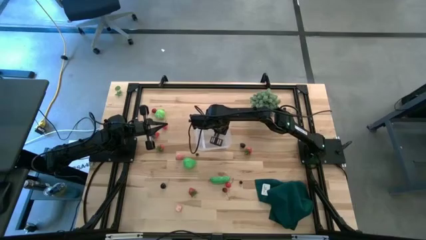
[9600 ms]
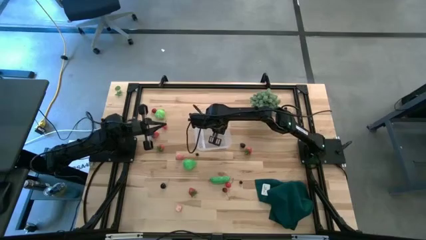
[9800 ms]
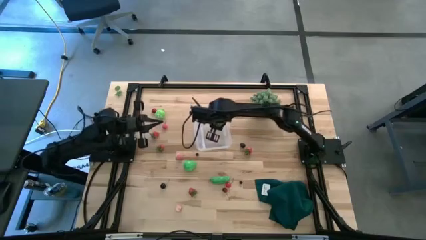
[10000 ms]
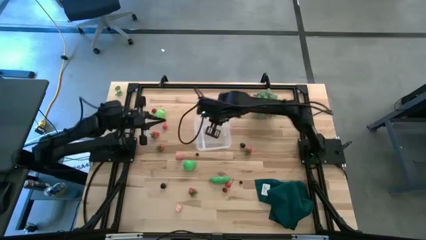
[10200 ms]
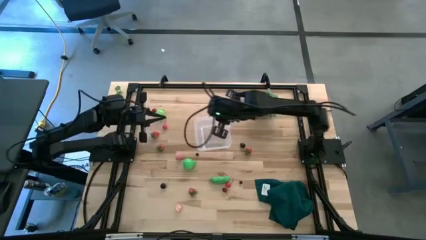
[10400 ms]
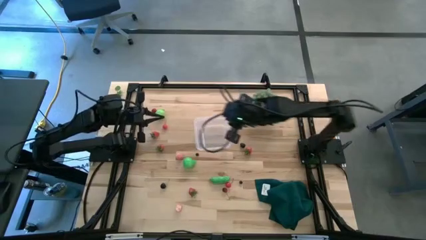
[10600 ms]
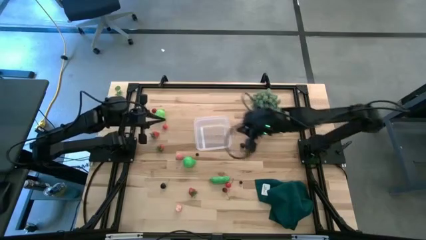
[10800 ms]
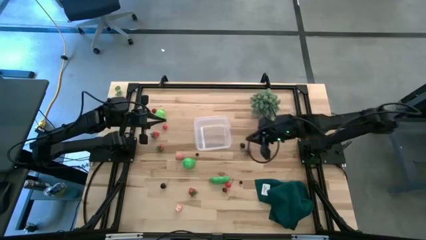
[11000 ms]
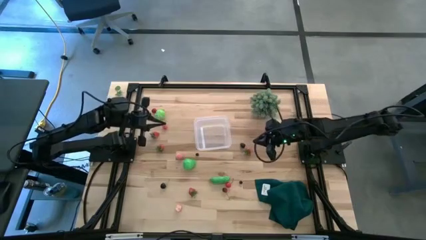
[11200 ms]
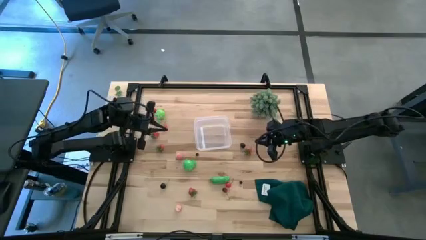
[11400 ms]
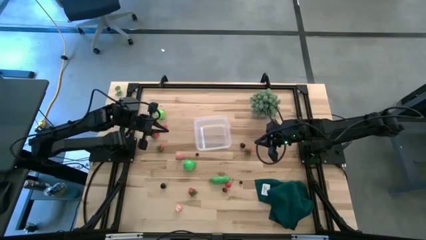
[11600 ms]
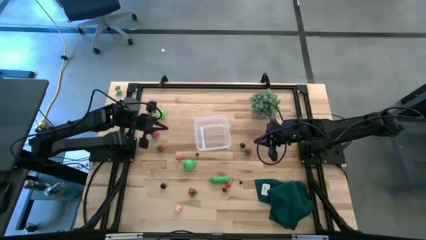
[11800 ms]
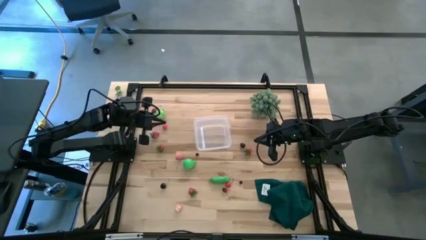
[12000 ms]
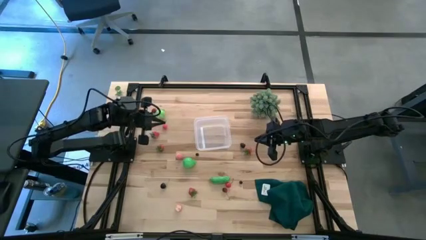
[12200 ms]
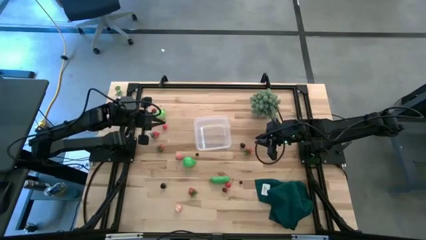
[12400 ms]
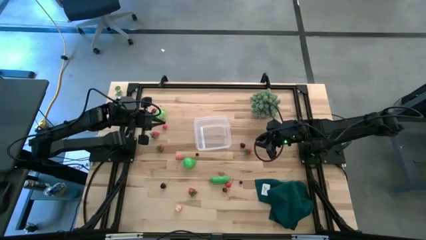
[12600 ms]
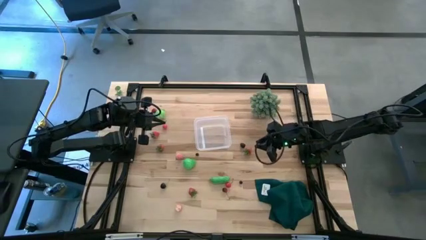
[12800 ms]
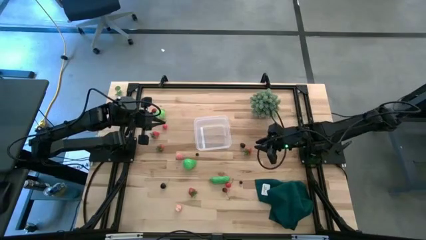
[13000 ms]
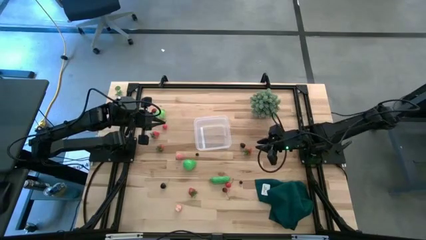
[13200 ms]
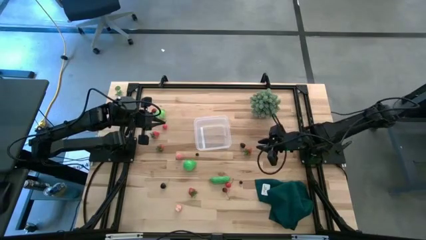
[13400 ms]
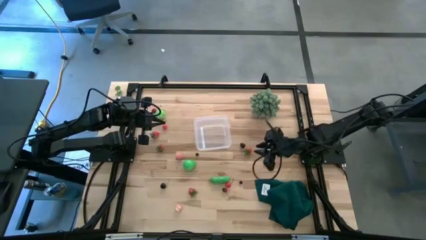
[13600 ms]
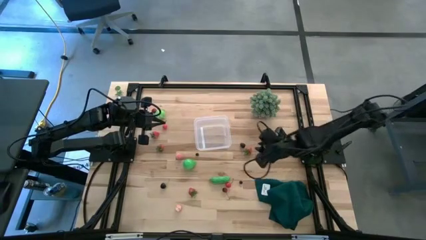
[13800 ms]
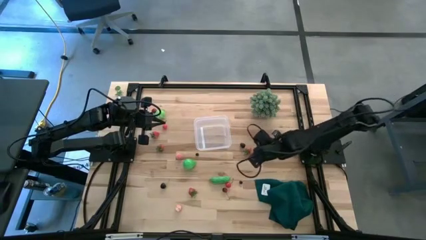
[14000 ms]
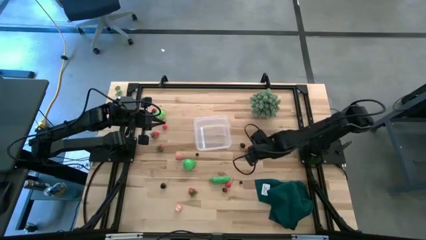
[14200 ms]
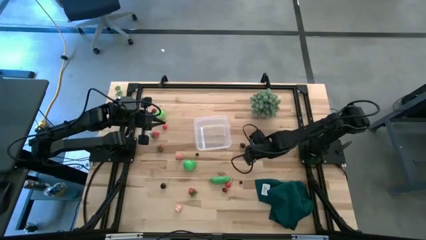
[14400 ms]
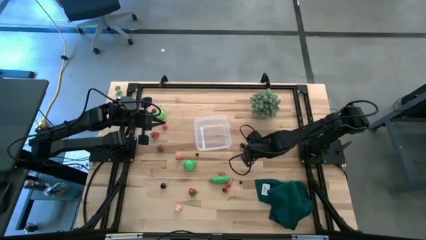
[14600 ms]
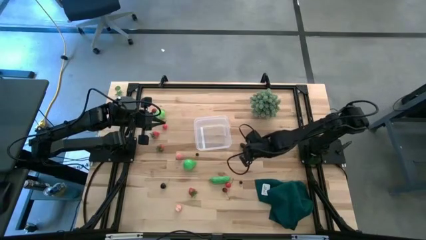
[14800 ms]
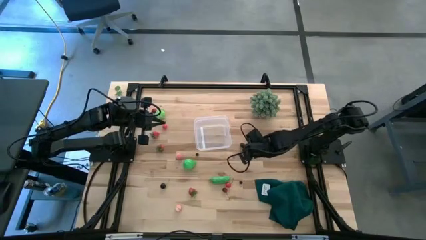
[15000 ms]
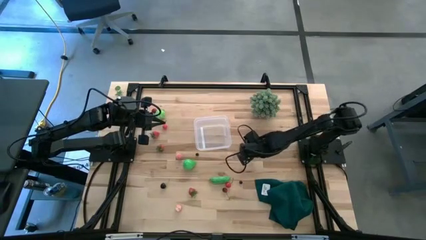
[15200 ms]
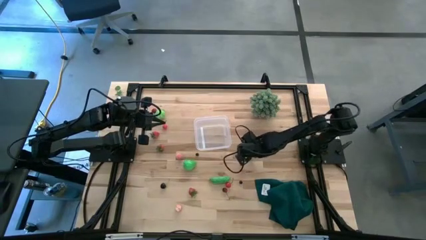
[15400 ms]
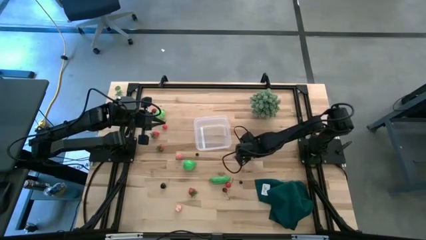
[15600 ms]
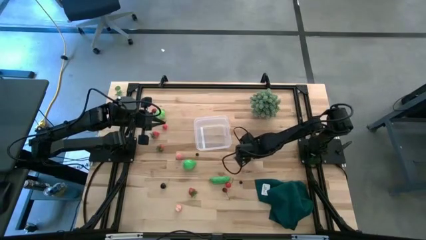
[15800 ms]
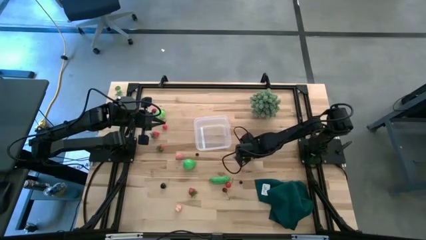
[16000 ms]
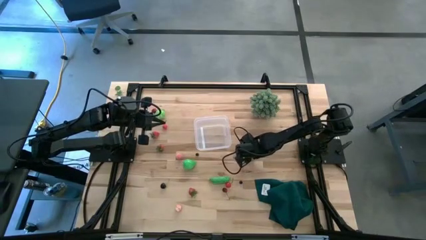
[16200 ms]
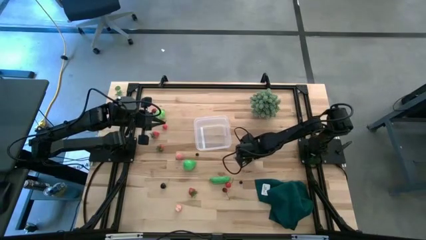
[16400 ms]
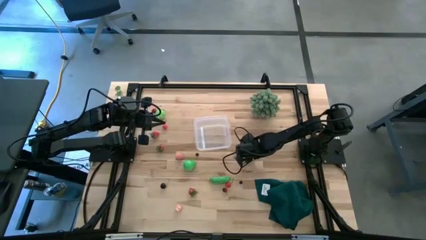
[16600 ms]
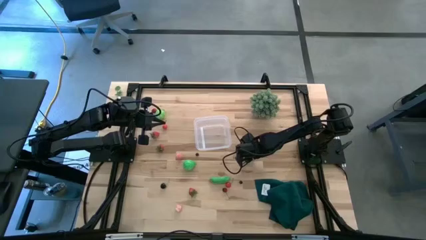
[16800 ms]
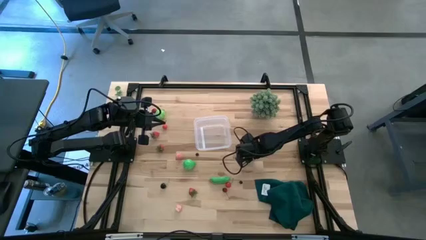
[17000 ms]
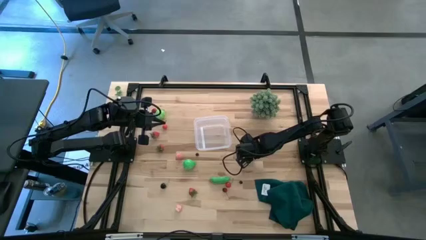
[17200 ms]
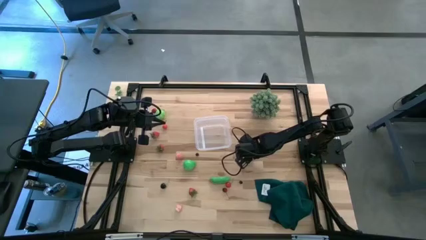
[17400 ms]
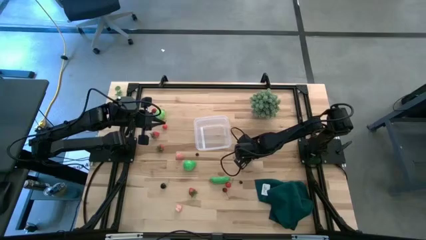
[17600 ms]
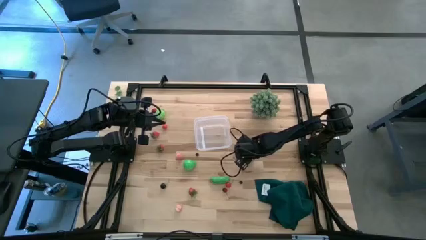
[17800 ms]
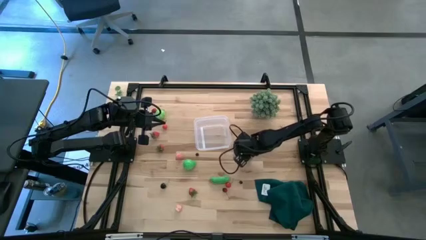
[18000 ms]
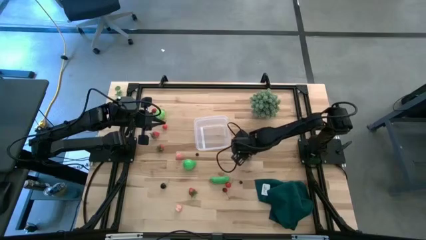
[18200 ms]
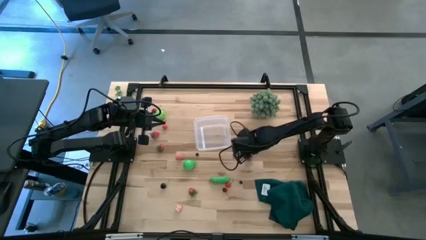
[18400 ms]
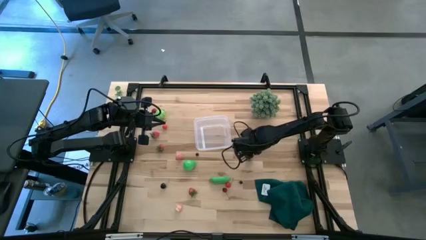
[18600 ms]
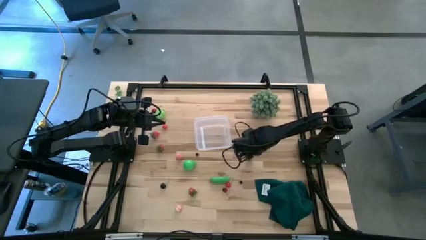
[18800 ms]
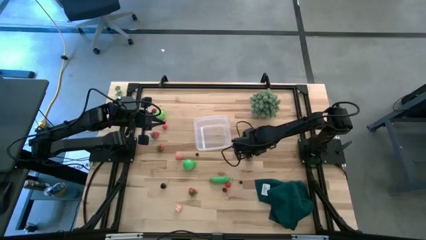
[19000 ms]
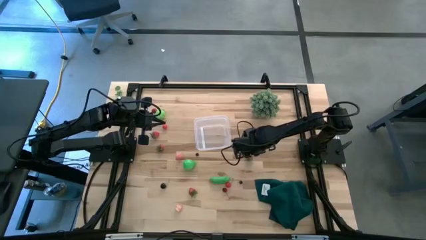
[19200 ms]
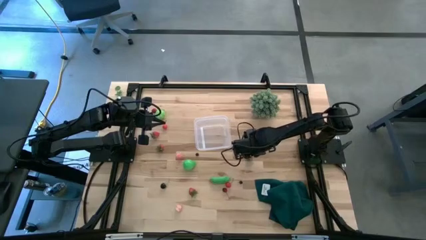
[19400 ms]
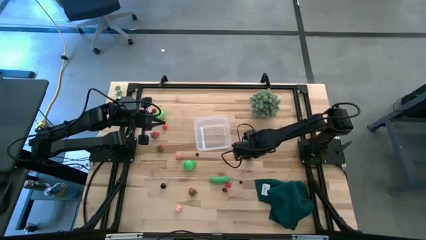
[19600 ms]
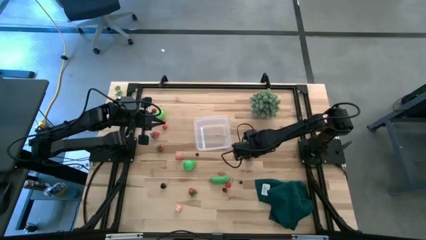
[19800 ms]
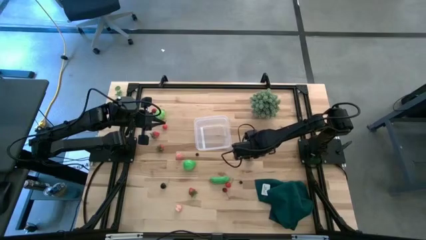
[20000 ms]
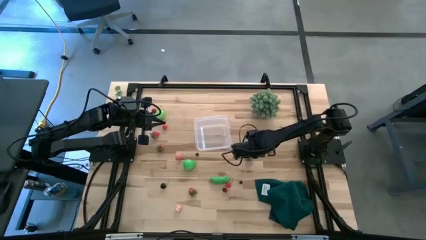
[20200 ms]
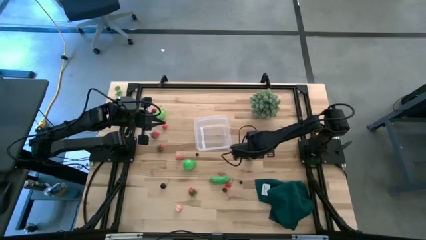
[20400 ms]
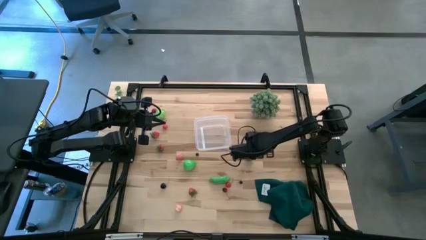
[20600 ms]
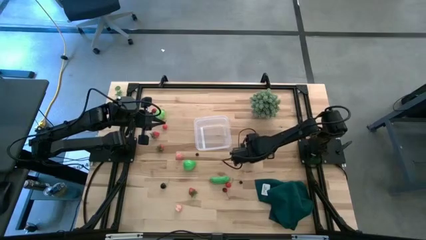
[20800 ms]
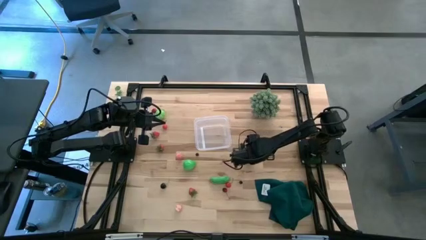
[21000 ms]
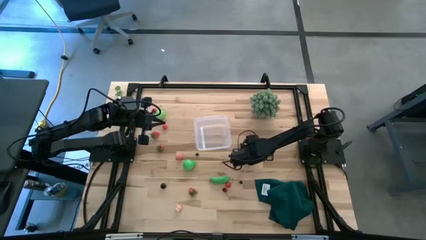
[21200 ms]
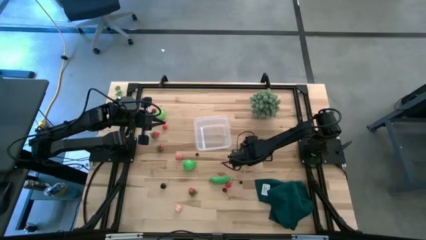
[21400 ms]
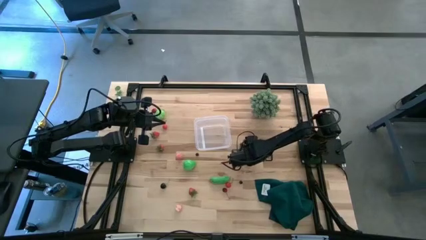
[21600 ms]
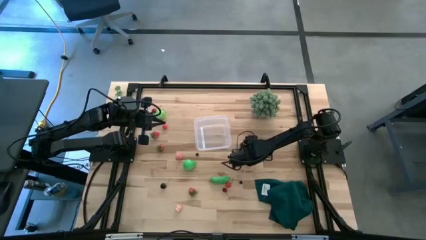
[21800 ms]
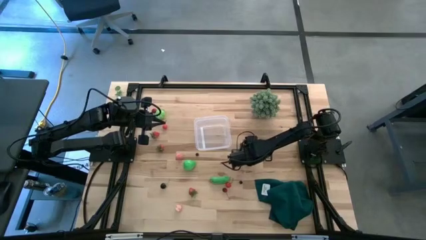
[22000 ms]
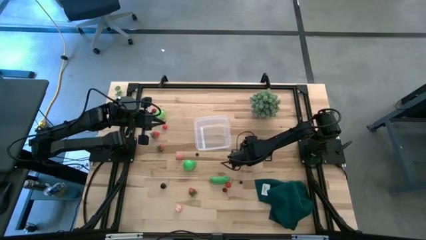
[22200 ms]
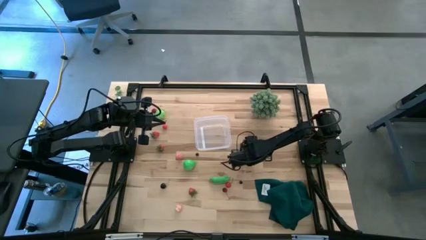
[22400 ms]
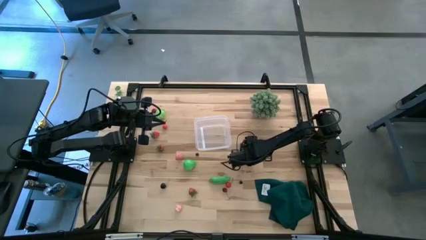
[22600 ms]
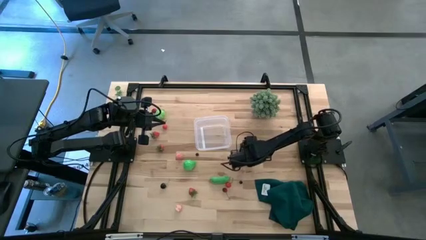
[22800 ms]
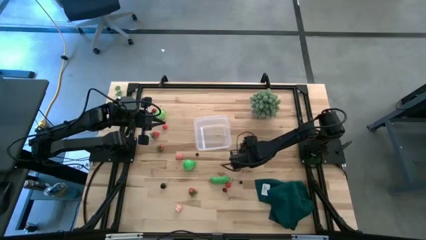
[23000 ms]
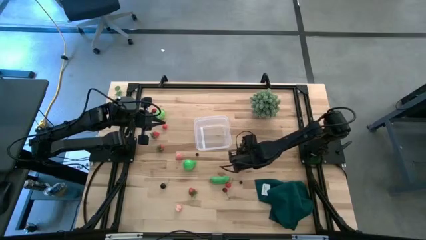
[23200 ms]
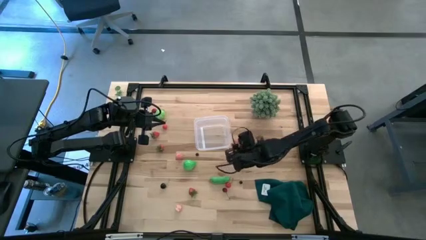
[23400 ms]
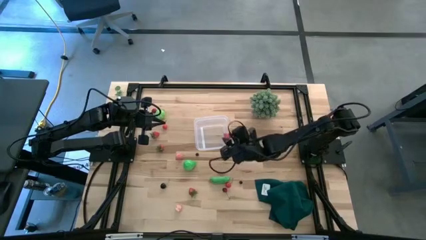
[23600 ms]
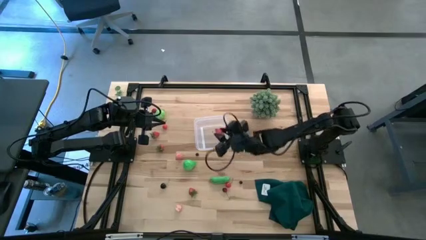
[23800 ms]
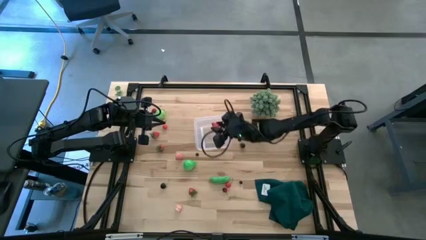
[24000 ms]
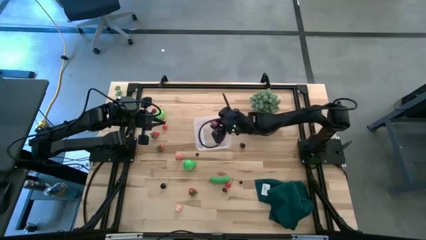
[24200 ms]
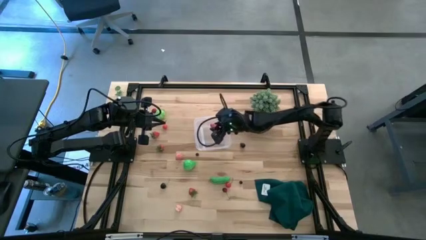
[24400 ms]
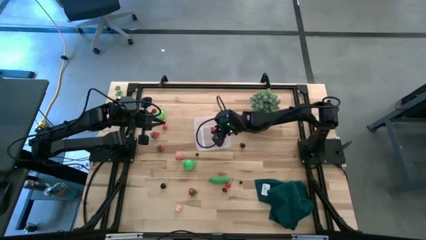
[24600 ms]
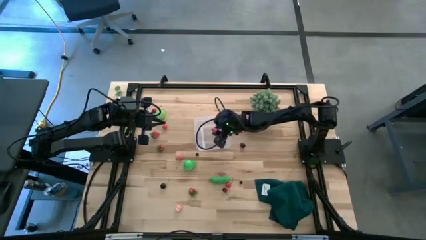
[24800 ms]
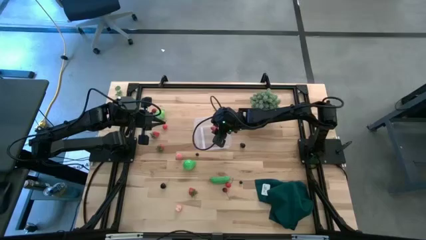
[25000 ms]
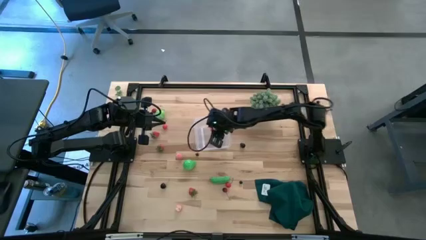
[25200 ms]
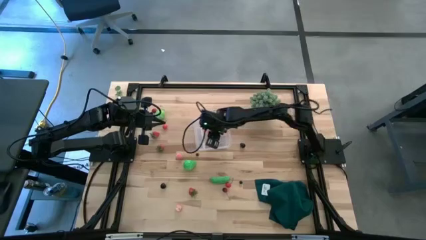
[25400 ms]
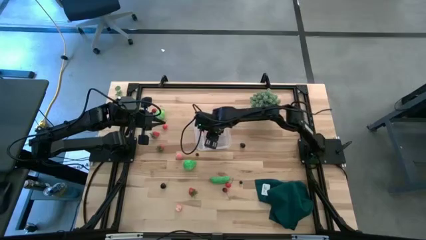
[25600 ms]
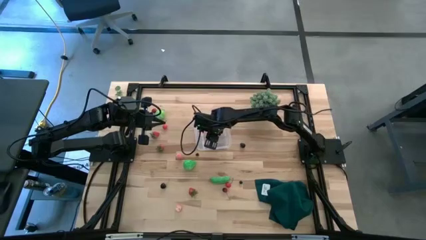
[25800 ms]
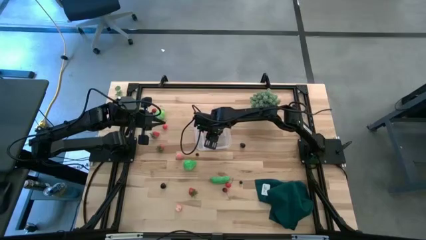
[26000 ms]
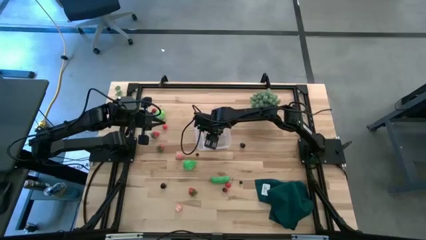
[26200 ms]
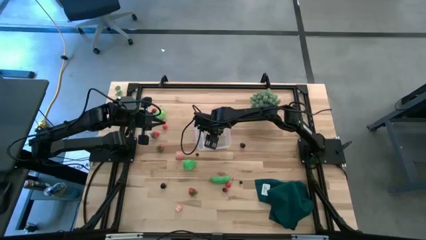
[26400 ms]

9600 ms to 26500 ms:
Task: Pick and placing Produce into tupperware
Put the strawberry into the transparent bin
